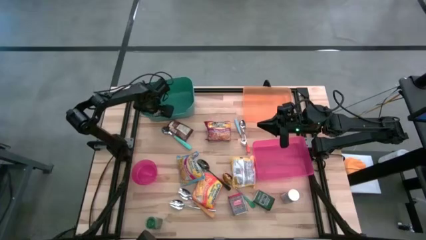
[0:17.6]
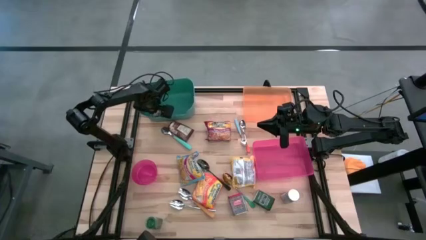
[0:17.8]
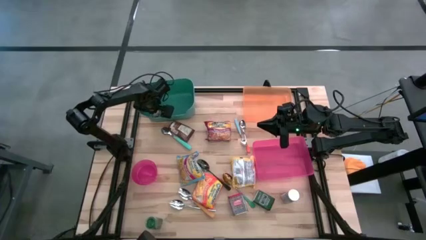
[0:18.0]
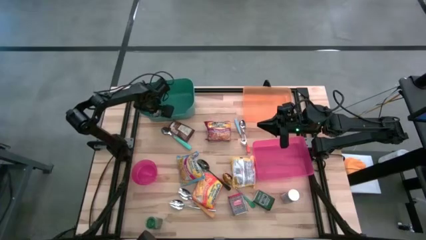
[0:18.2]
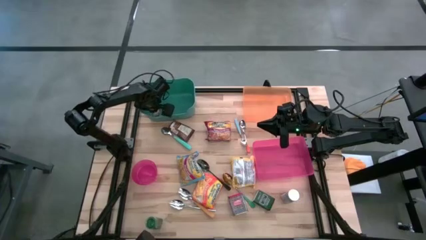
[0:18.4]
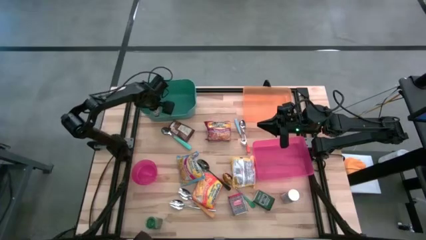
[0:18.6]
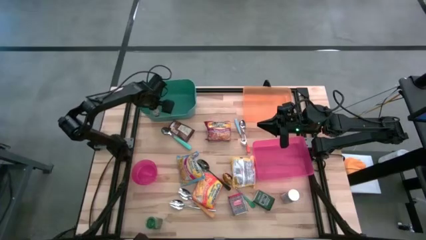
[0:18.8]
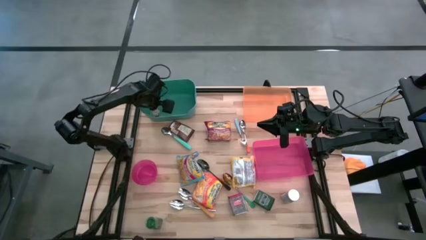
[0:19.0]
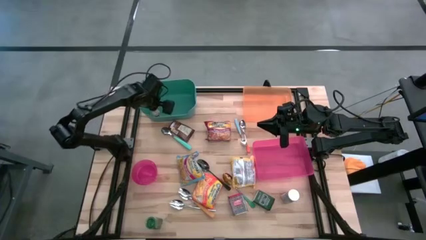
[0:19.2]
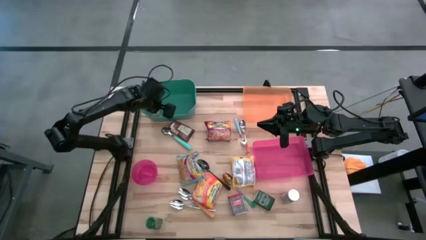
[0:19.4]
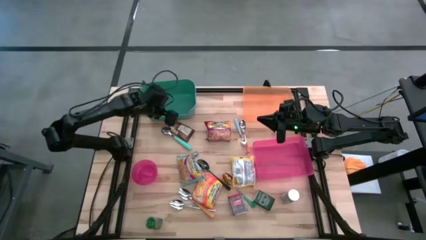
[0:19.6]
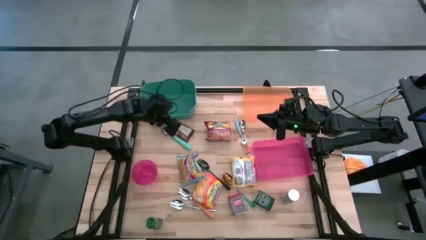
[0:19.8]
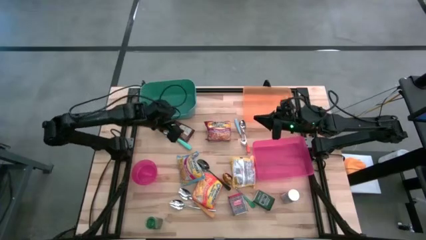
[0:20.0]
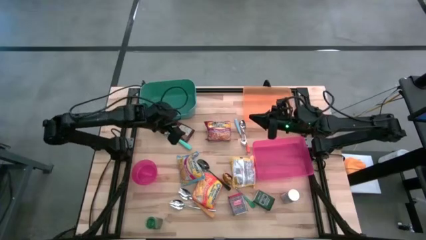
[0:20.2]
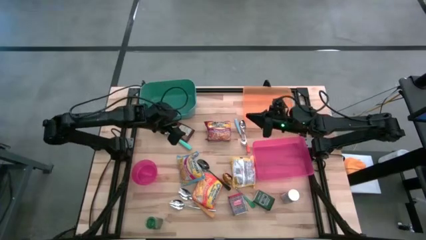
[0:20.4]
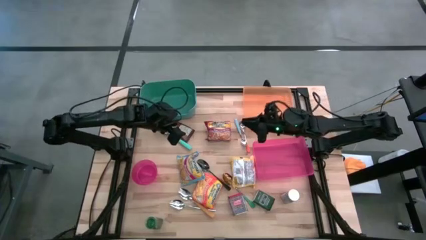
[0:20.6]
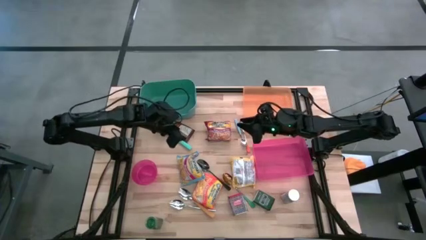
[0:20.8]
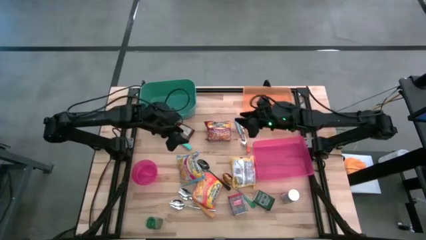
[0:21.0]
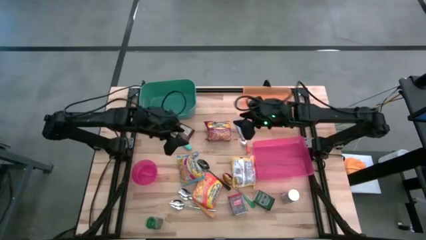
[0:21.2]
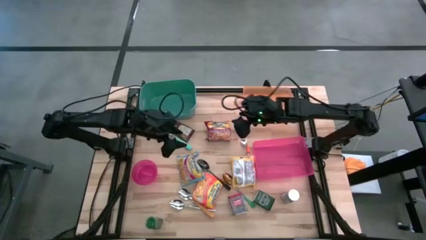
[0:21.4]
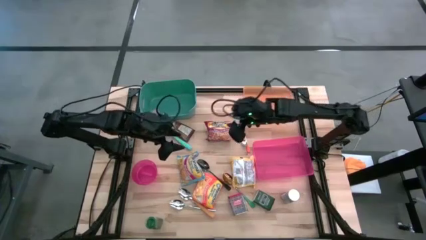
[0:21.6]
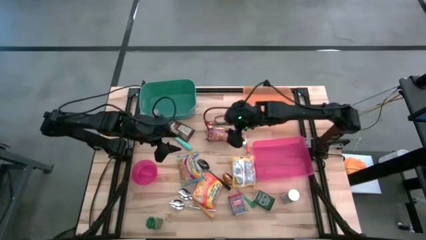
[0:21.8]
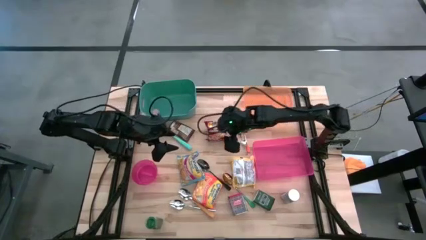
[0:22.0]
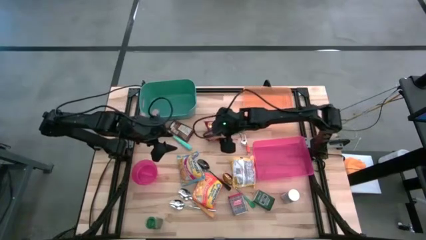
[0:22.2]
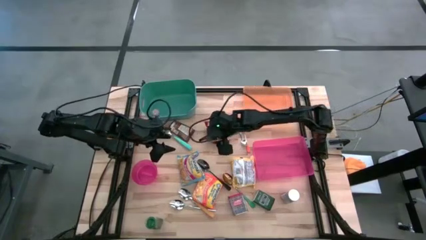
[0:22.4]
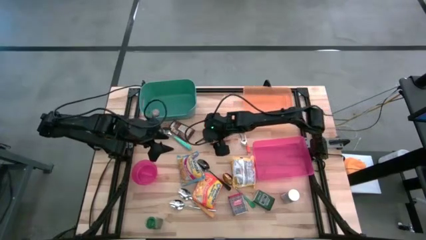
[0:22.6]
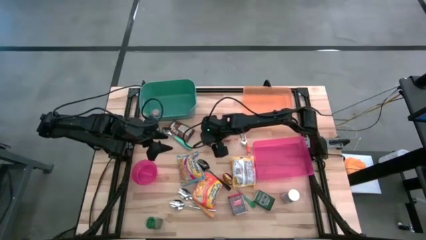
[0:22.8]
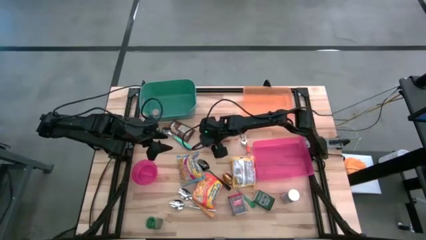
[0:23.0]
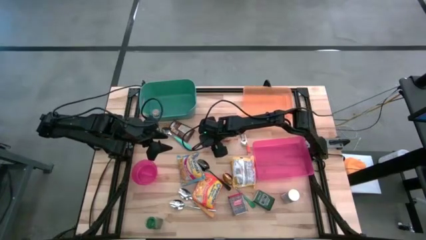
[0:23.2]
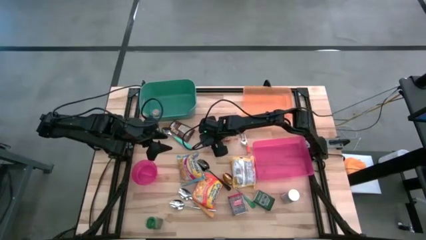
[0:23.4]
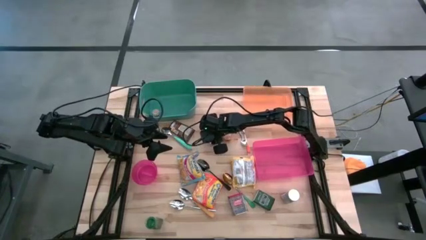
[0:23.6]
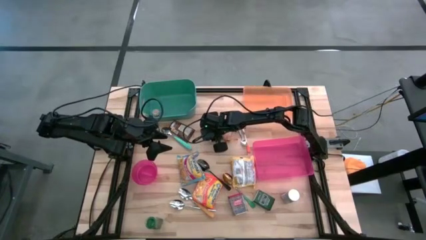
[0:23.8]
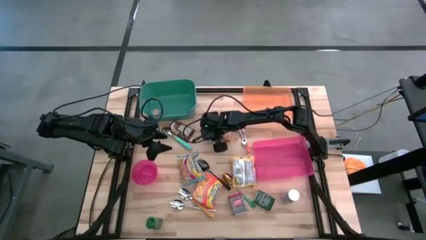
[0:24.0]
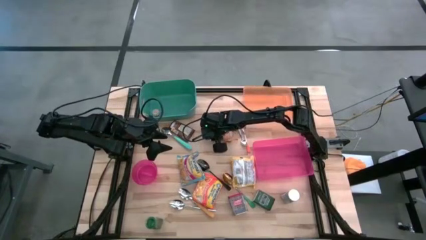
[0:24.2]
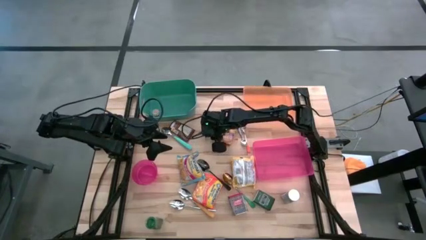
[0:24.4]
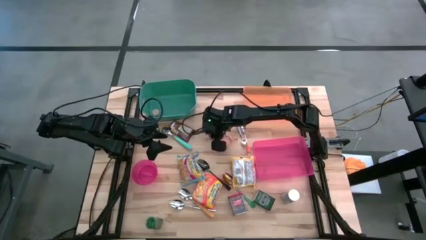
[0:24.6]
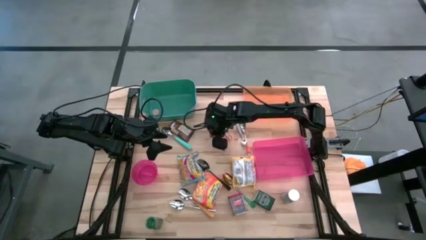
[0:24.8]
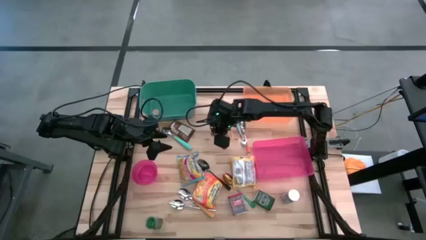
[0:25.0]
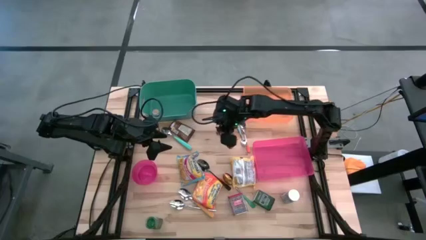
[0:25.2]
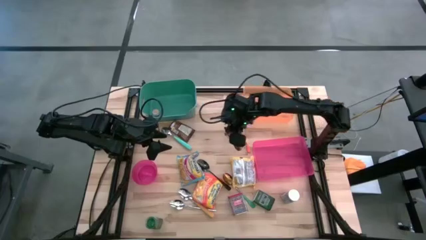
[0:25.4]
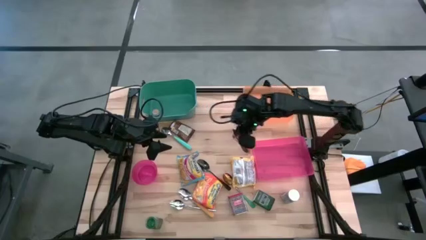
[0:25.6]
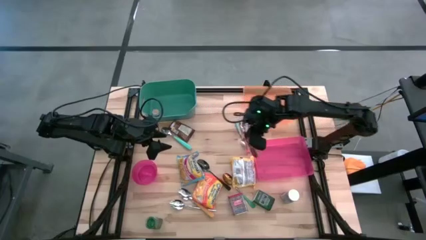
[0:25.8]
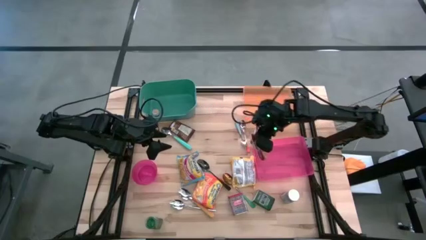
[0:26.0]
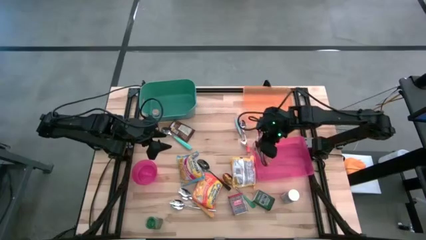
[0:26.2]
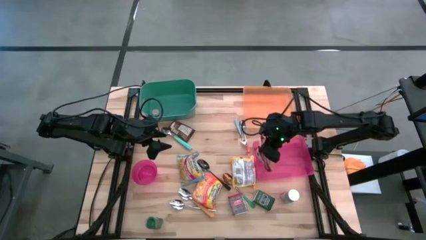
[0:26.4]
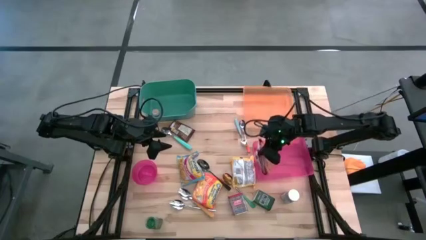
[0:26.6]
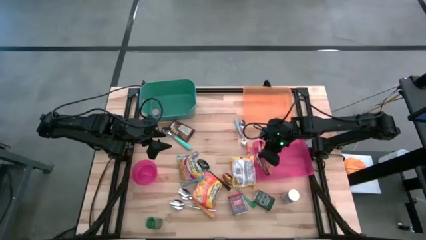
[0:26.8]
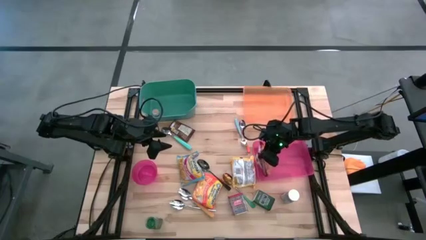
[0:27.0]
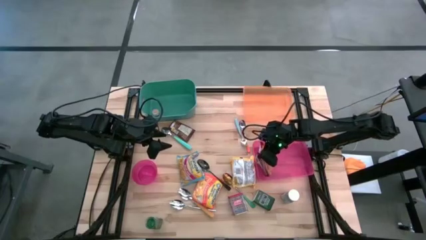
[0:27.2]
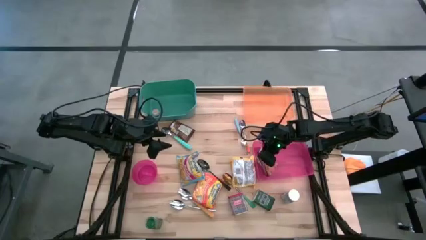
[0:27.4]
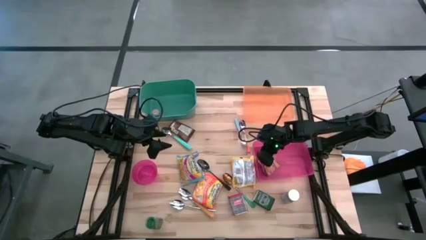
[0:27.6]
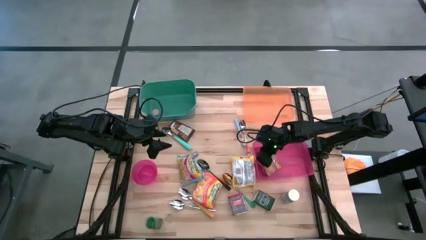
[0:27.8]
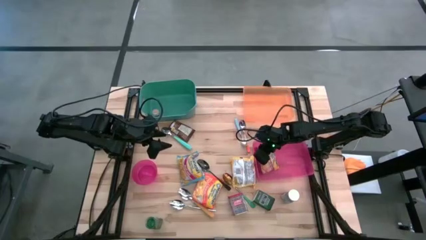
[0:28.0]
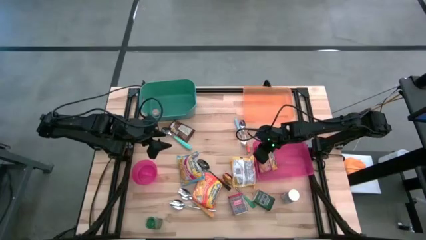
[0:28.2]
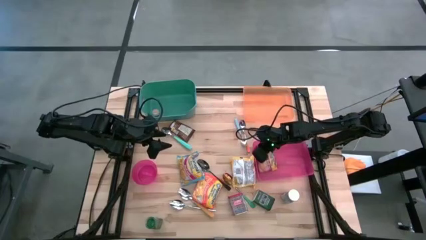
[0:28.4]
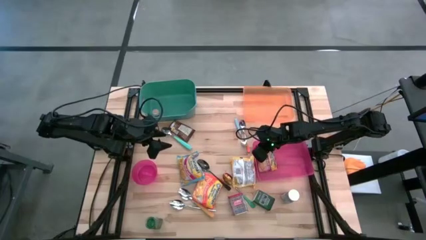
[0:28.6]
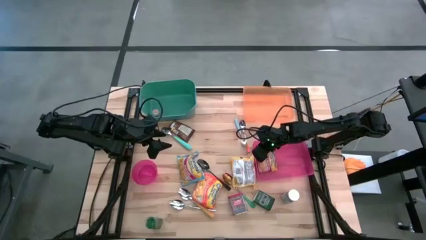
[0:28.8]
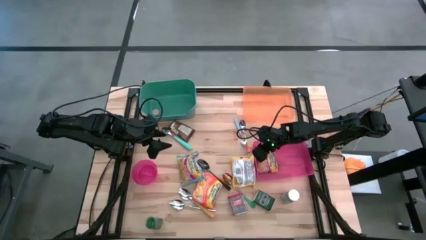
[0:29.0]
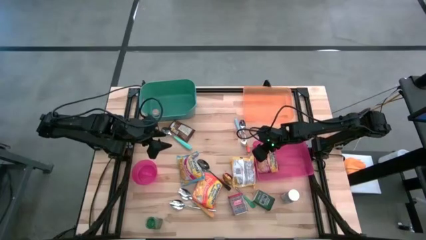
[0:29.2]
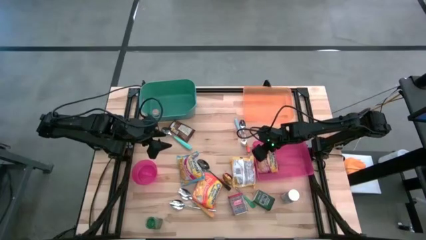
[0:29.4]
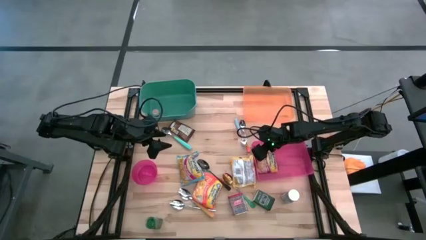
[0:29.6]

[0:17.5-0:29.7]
Put the red noodle pack into the pink bin
